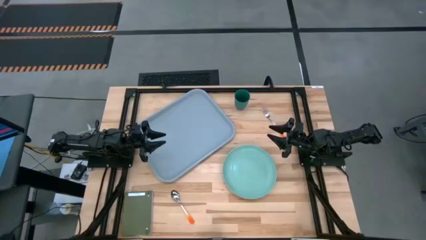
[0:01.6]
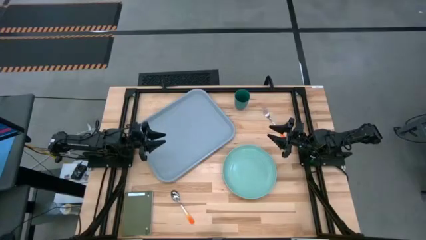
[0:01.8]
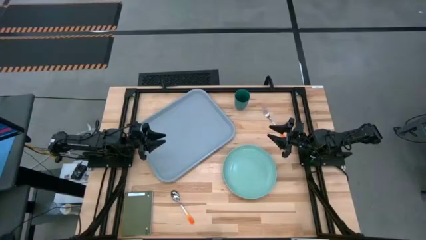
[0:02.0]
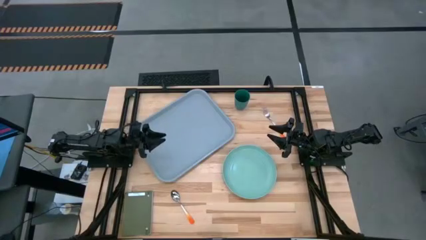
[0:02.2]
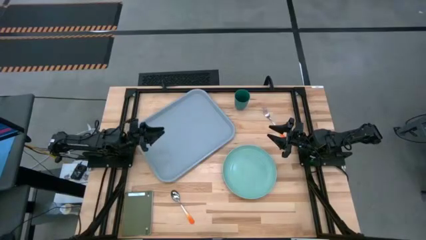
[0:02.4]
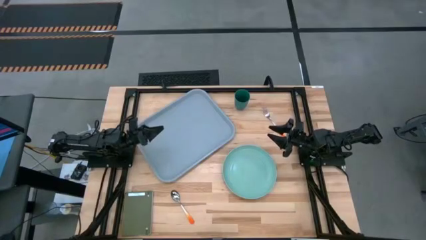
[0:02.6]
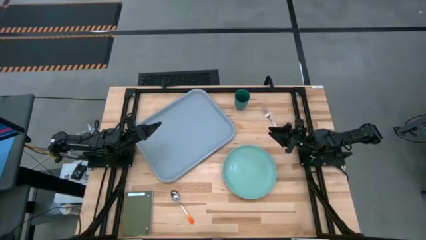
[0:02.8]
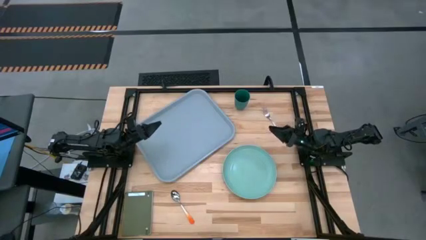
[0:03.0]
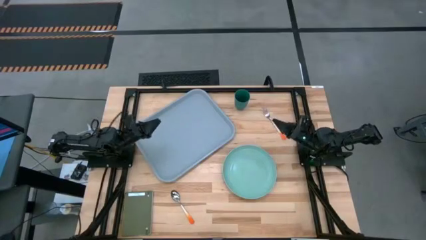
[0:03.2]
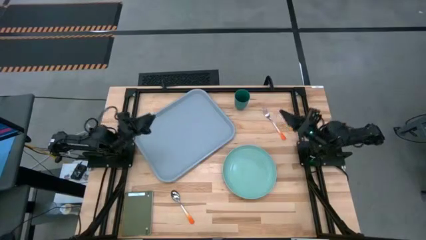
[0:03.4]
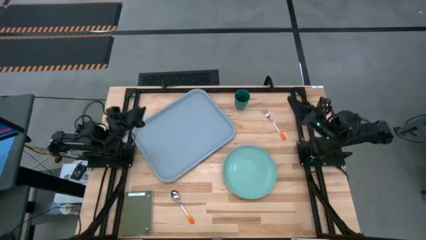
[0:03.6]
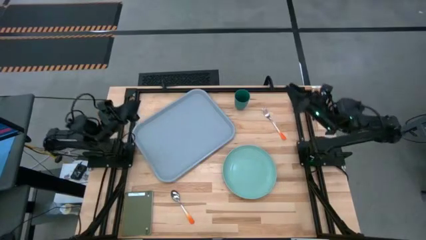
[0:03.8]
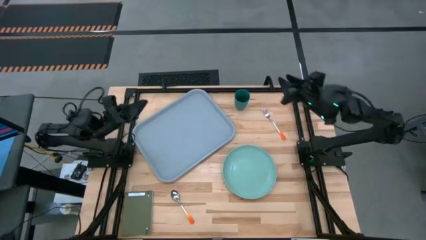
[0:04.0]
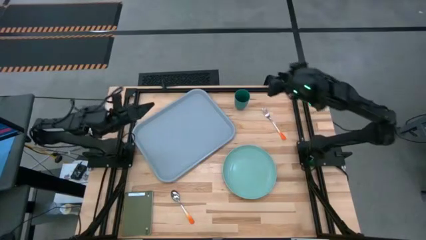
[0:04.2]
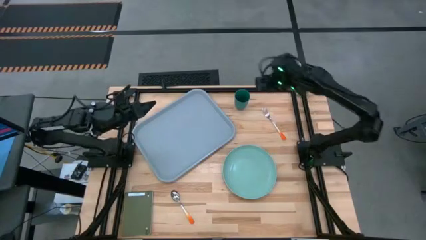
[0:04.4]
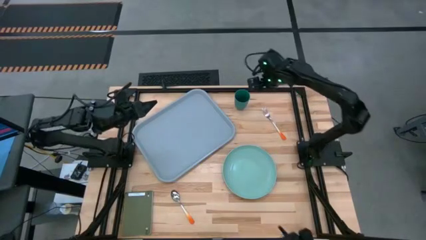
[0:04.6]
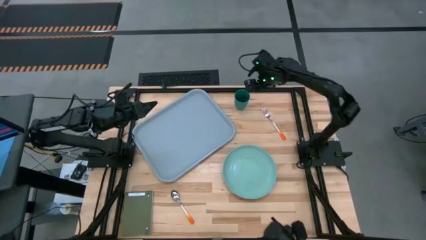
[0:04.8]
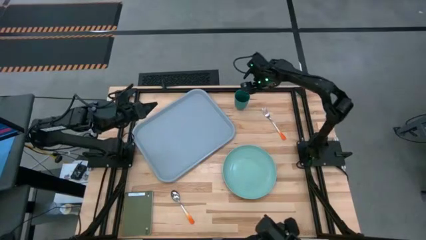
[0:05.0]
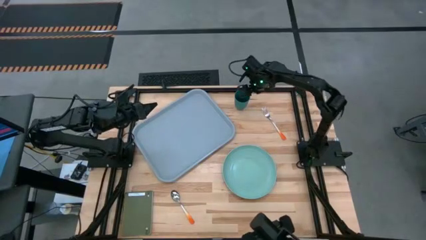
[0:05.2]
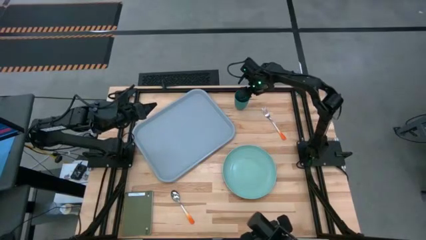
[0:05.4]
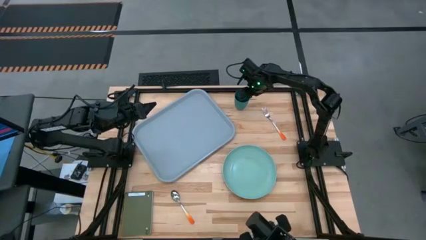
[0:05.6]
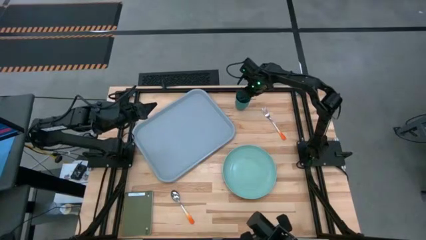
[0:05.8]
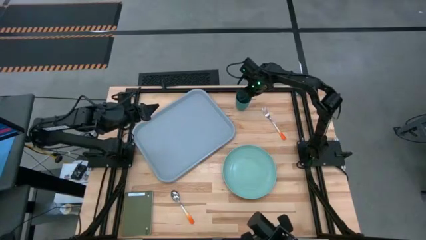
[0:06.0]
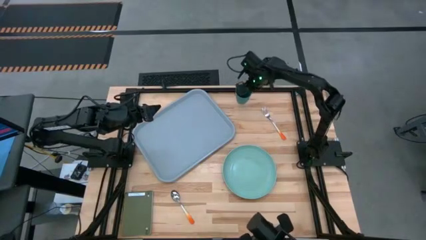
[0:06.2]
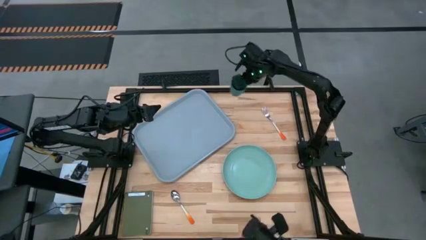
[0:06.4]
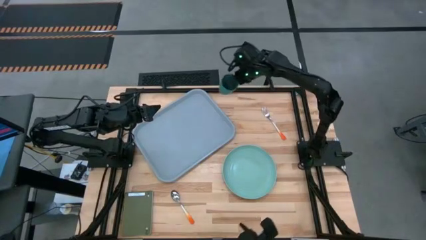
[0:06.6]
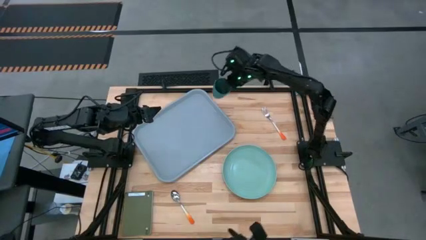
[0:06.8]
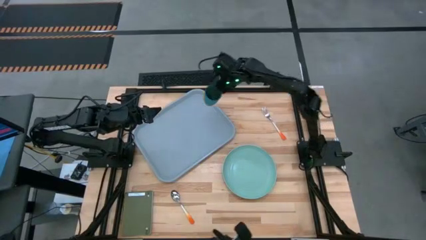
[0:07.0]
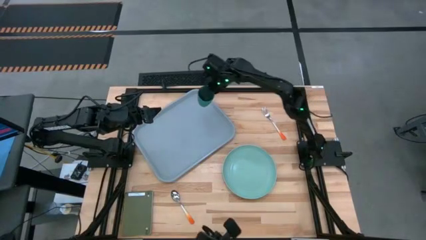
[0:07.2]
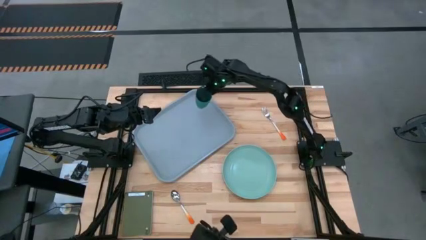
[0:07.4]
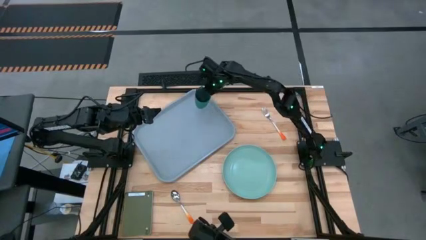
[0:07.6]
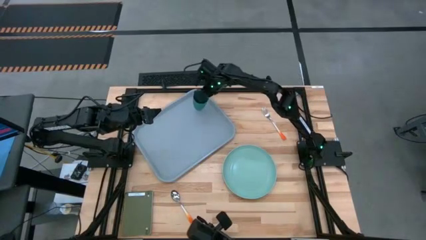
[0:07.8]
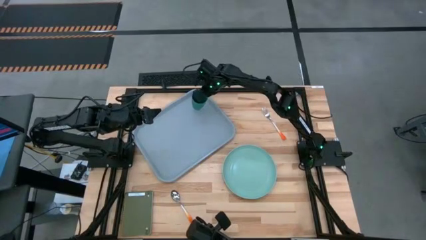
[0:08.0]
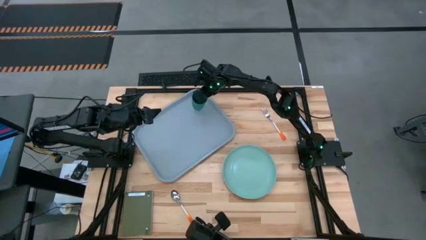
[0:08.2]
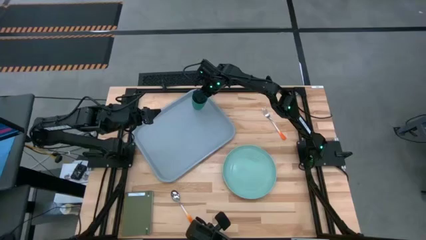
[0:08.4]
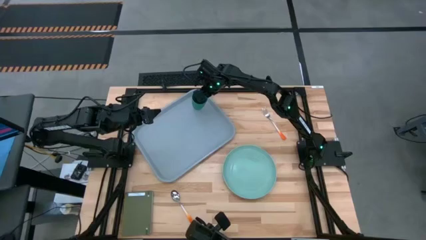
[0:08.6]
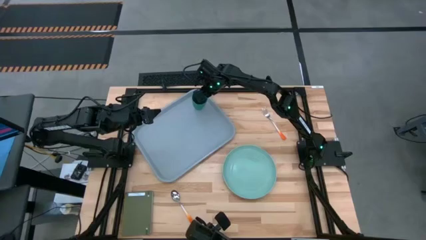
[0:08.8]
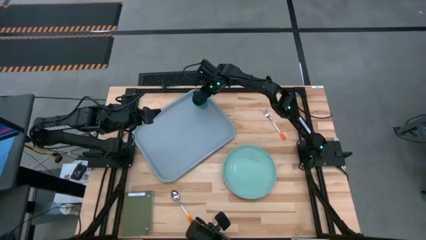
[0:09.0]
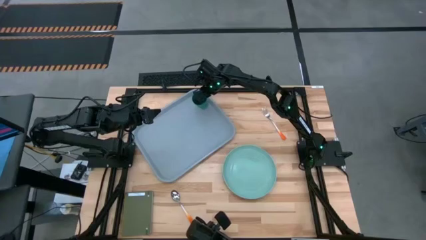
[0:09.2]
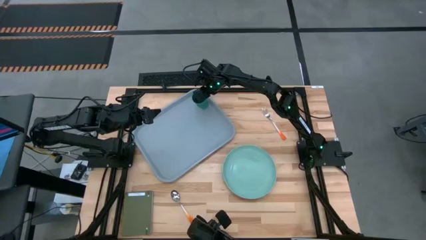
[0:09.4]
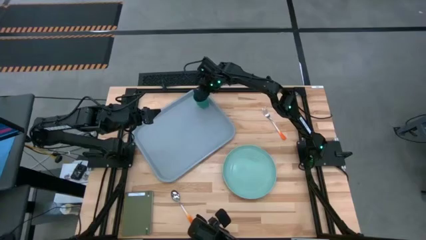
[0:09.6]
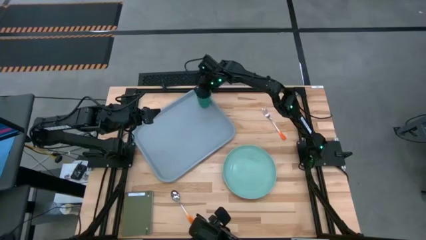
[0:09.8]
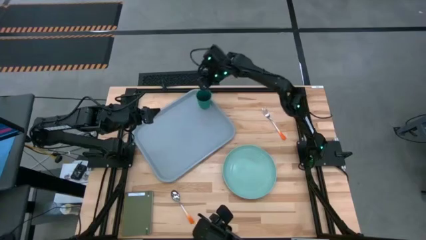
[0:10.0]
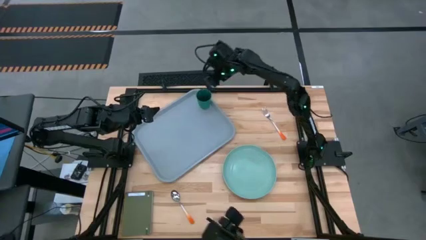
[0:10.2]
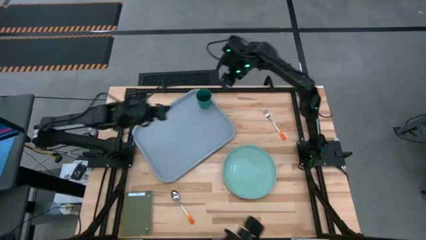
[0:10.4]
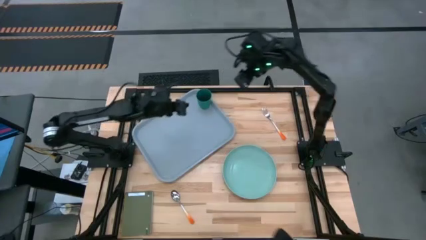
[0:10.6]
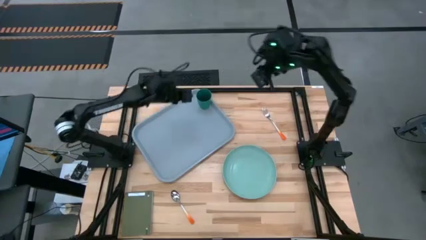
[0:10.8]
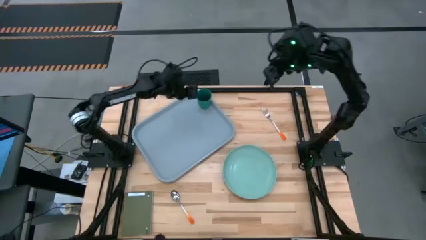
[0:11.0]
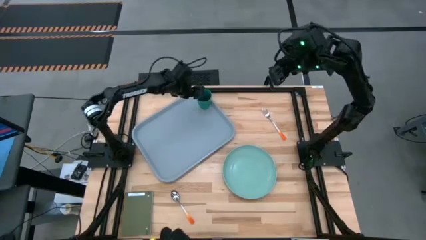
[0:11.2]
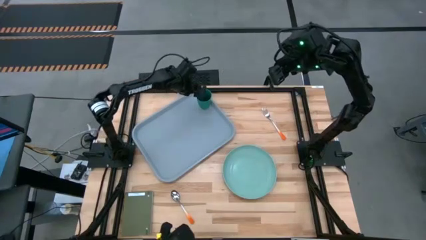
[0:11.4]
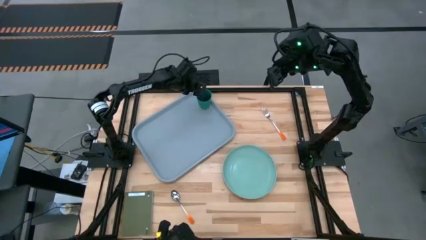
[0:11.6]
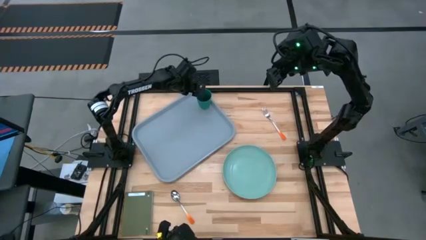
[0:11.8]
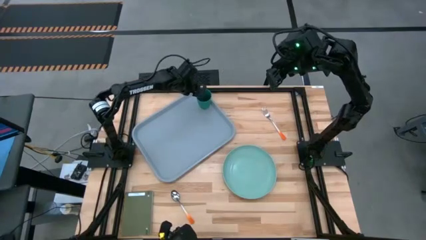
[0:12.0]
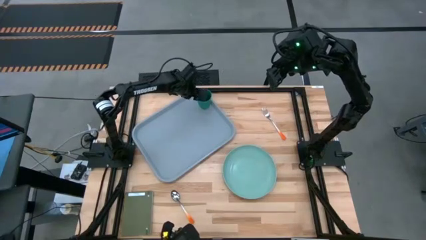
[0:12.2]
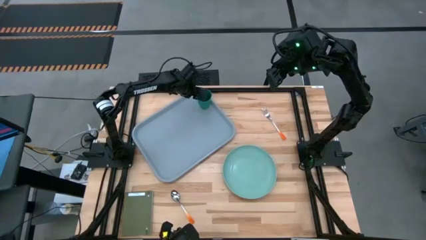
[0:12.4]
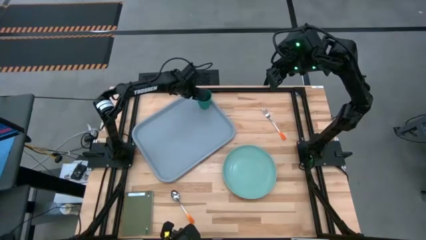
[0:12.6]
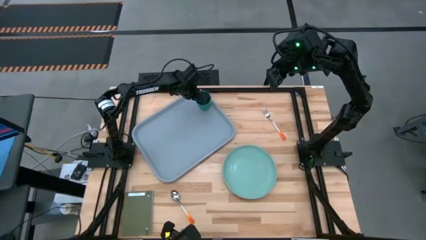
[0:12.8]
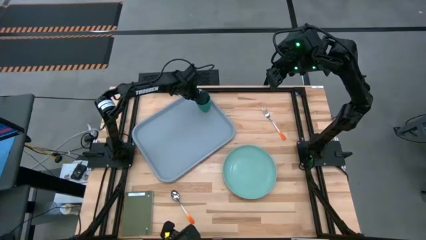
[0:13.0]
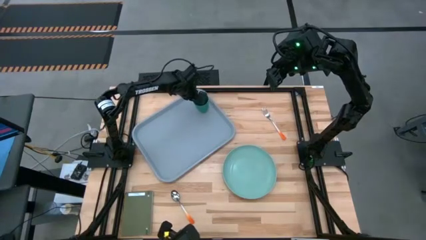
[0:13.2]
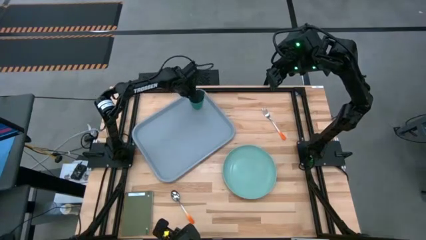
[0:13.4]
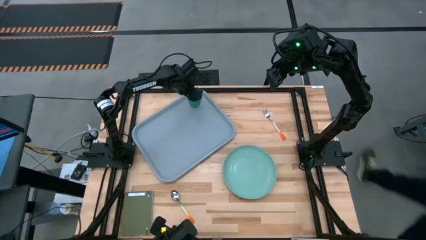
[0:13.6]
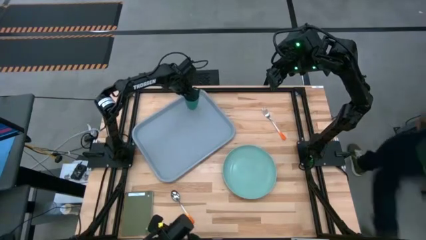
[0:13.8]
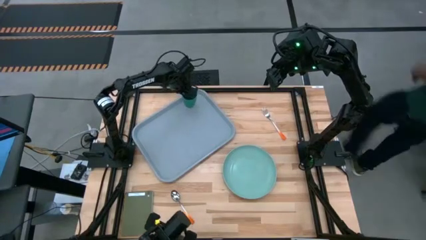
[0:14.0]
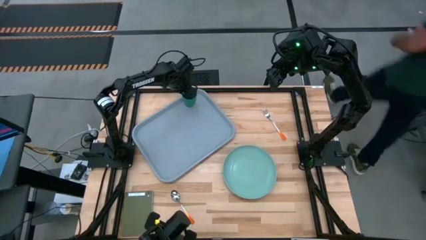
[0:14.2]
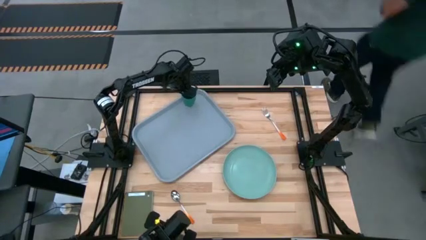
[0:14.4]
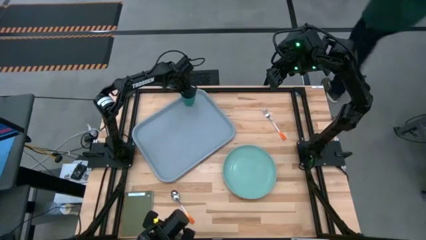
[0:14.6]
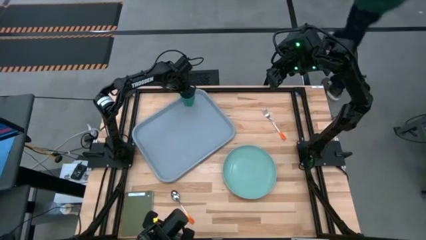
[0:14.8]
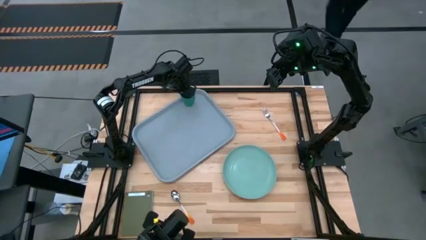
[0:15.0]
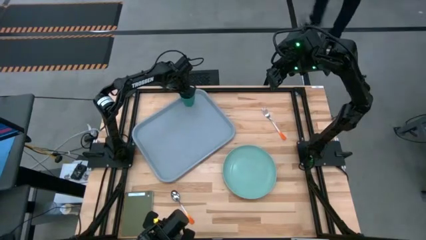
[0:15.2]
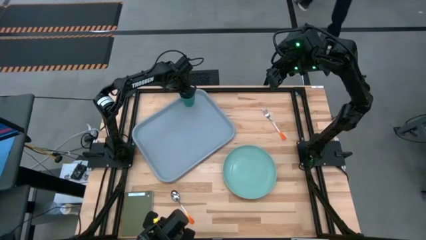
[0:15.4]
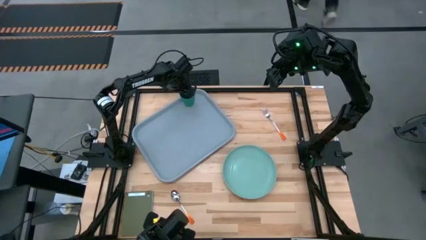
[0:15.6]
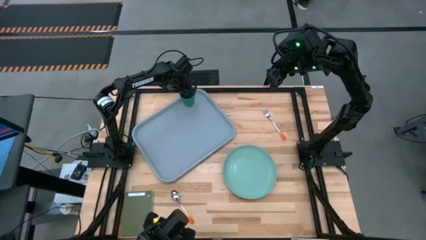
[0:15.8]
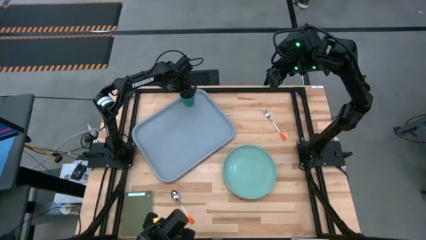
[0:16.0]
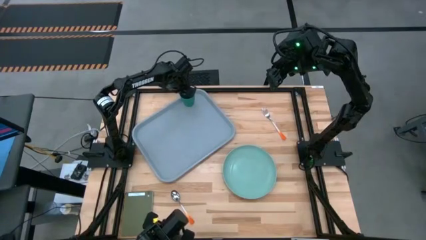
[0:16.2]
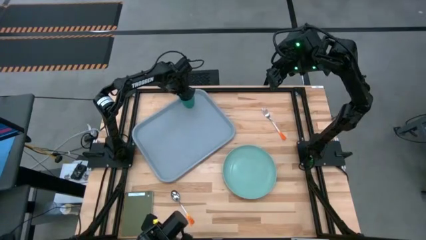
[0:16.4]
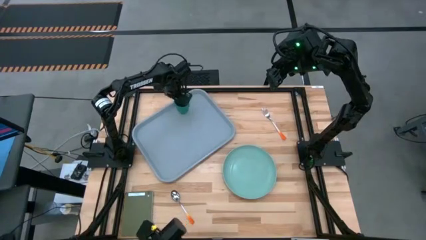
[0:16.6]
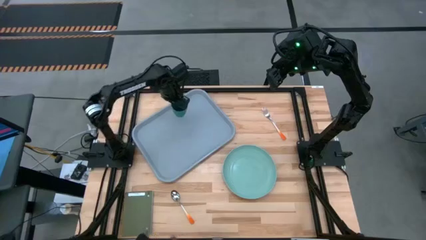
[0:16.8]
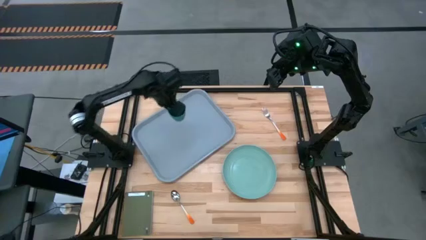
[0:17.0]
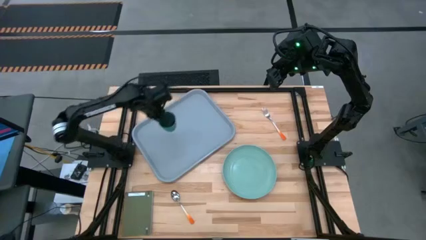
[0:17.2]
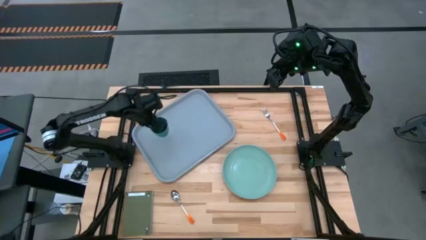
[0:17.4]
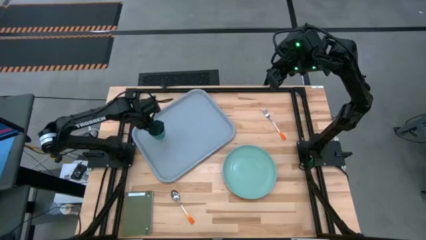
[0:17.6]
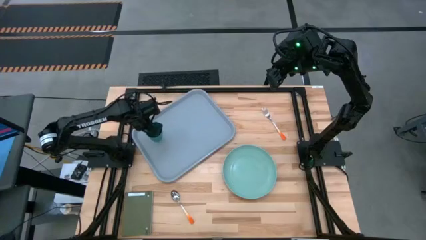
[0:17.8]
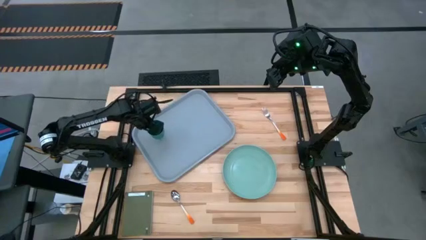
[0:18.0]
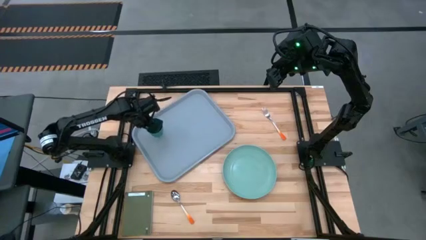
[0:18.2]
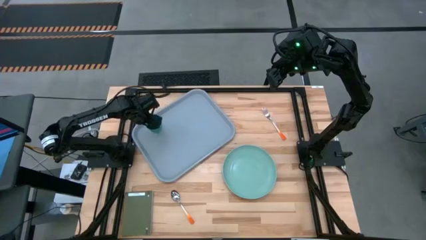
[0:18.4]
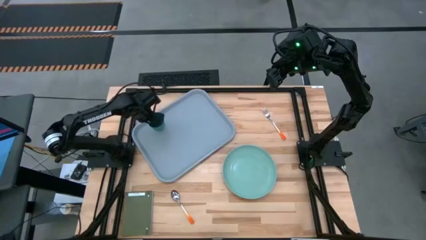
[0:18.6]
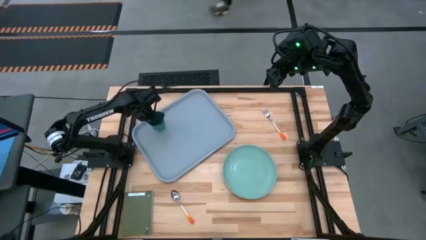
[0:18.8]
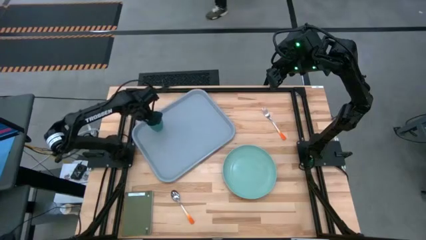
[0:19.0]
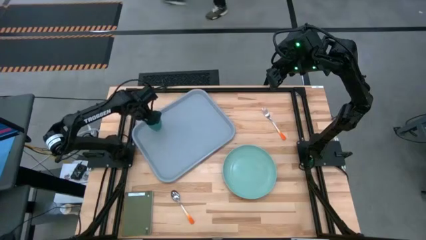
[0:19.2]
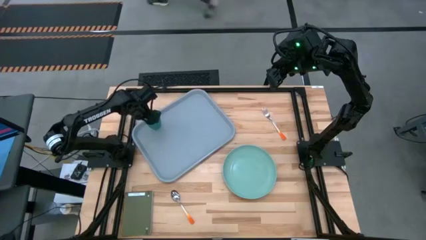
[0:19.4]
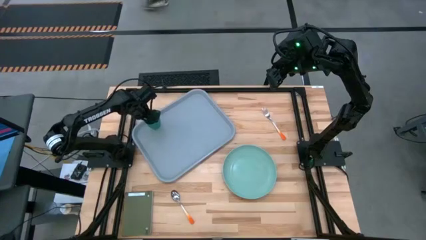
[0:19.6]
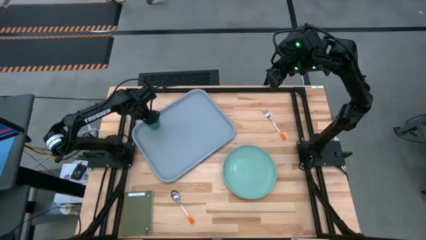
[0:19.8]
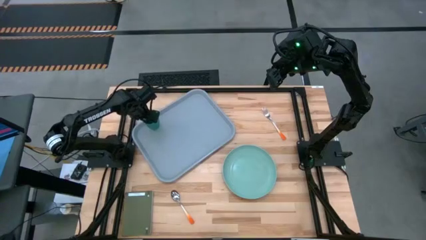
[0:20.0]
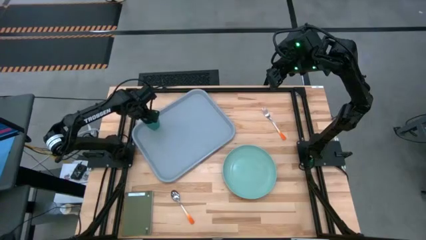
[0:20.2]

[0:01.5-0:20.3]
Task: Pick and place plate/cup/fork/spoon on tray
Put the teal cup on the gray tray
